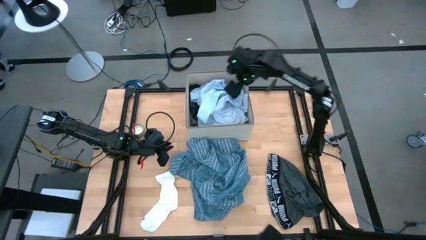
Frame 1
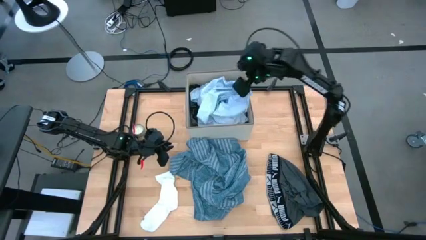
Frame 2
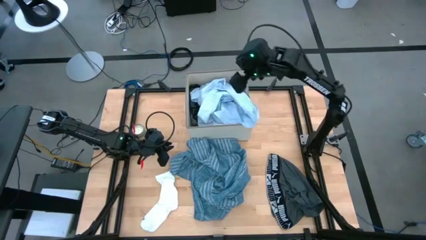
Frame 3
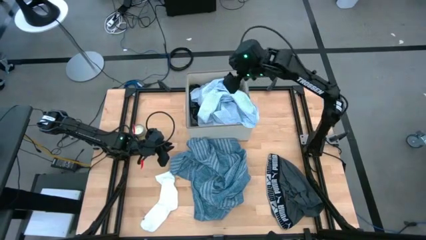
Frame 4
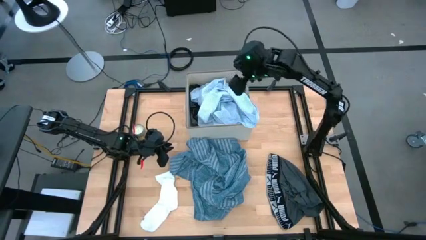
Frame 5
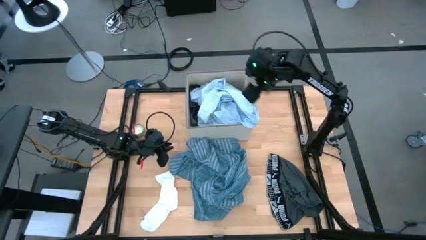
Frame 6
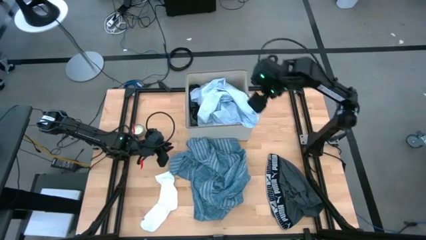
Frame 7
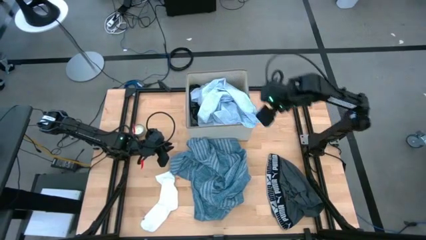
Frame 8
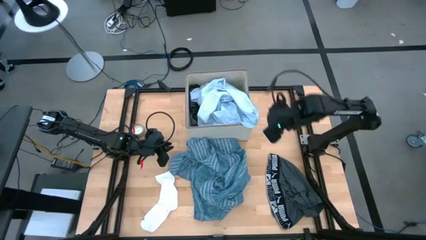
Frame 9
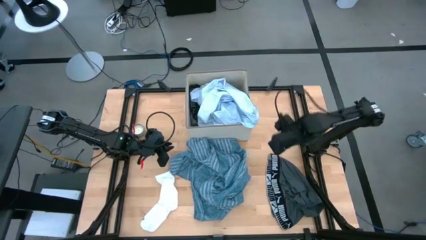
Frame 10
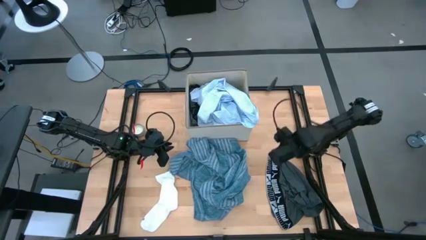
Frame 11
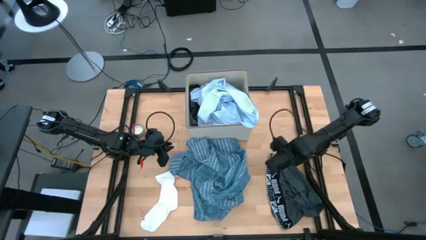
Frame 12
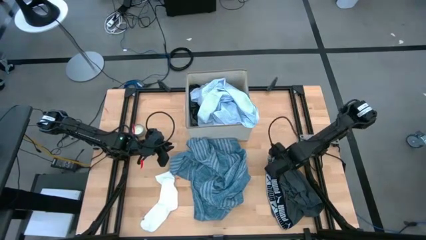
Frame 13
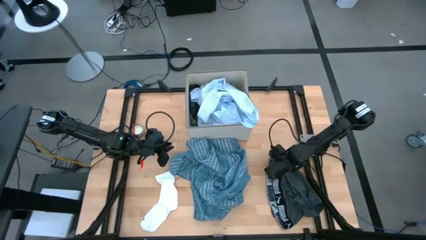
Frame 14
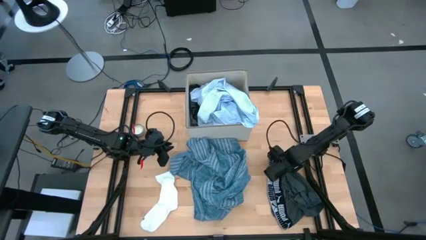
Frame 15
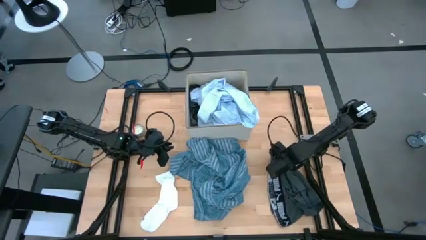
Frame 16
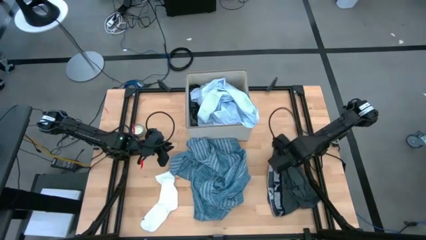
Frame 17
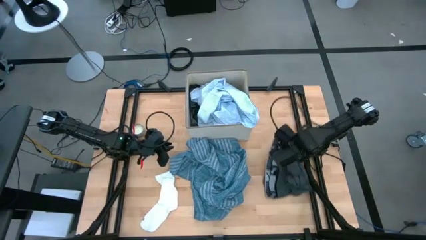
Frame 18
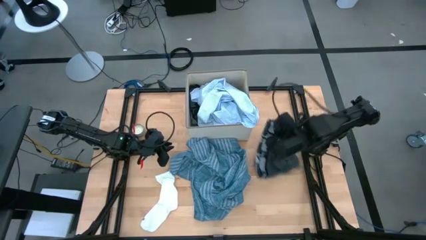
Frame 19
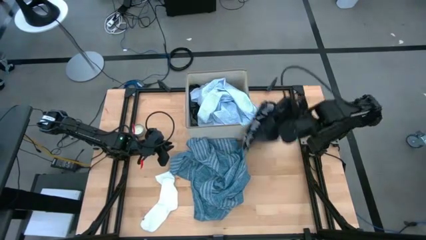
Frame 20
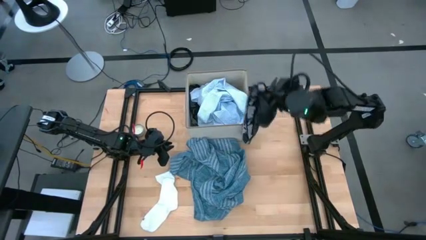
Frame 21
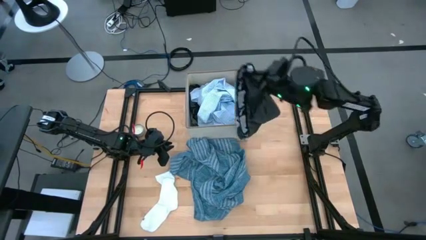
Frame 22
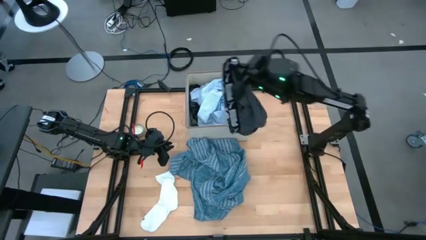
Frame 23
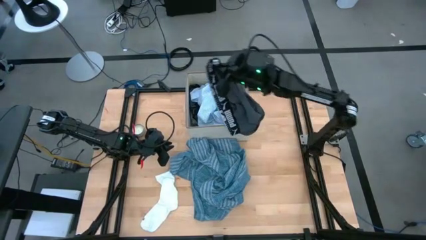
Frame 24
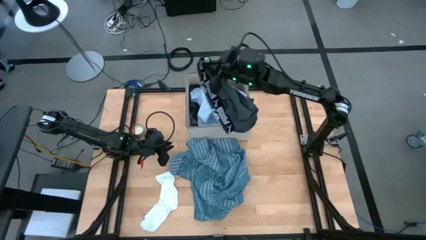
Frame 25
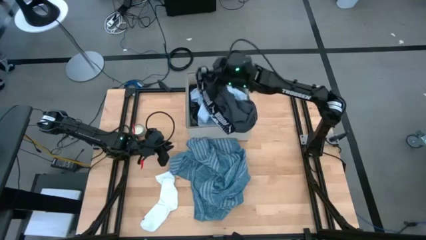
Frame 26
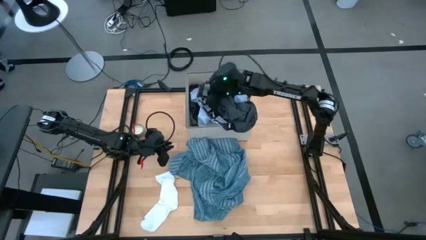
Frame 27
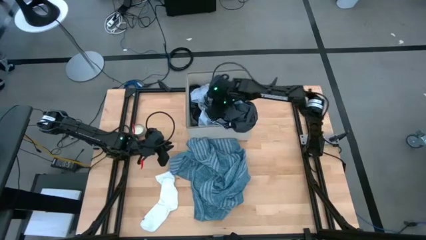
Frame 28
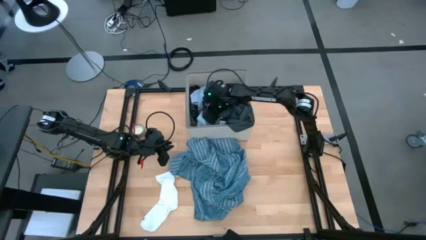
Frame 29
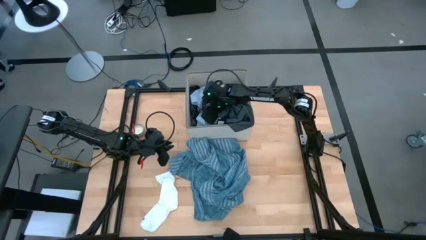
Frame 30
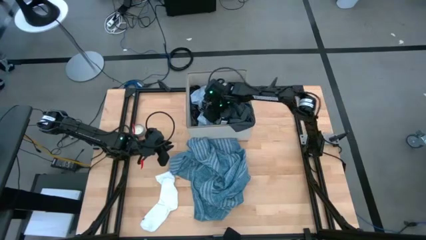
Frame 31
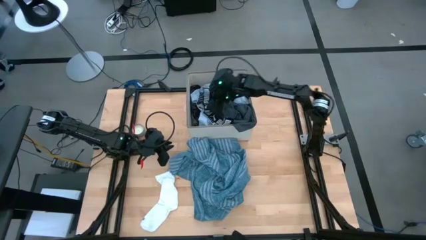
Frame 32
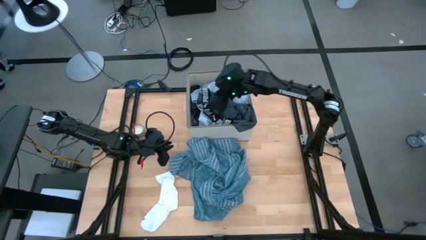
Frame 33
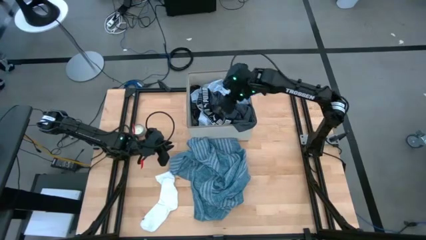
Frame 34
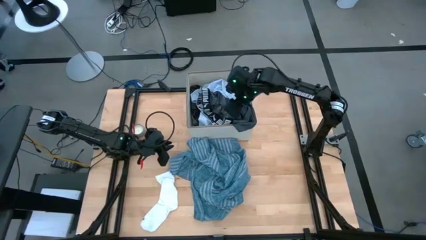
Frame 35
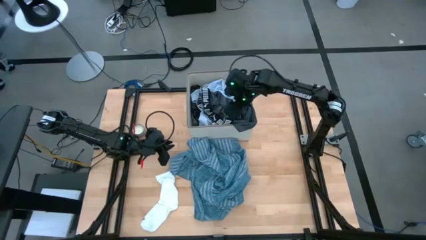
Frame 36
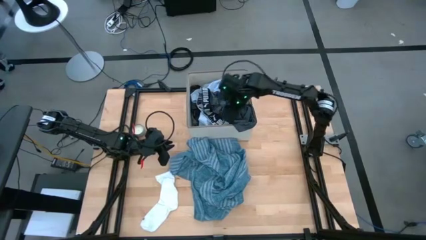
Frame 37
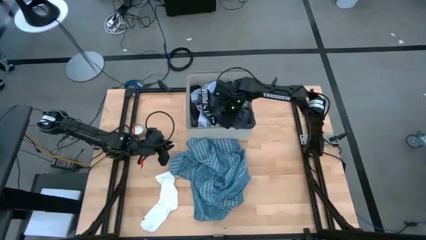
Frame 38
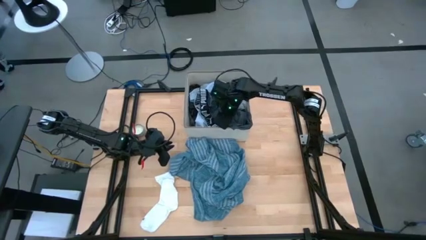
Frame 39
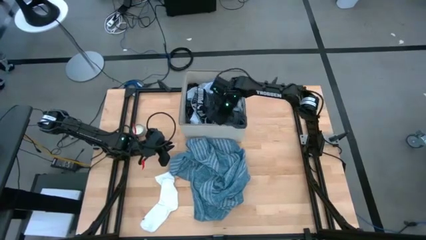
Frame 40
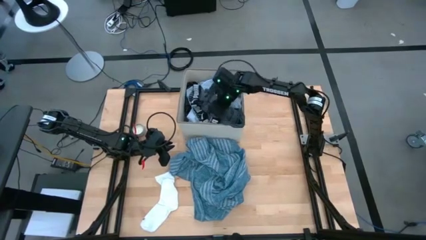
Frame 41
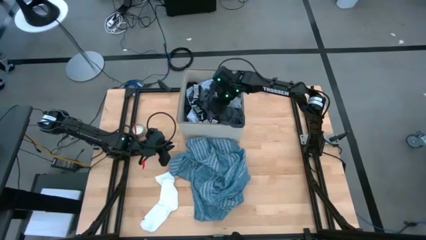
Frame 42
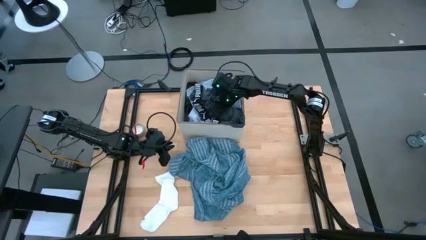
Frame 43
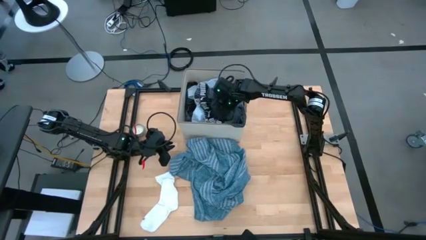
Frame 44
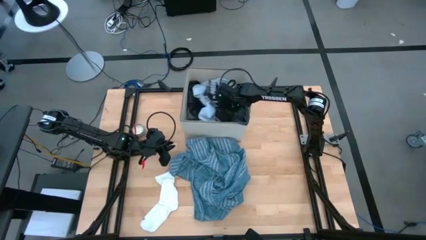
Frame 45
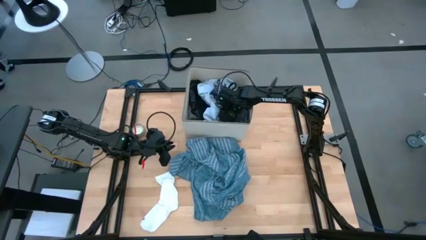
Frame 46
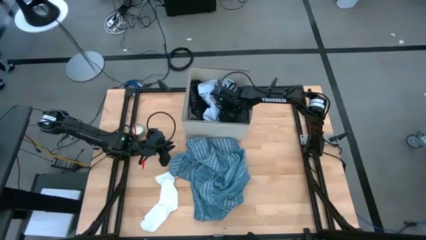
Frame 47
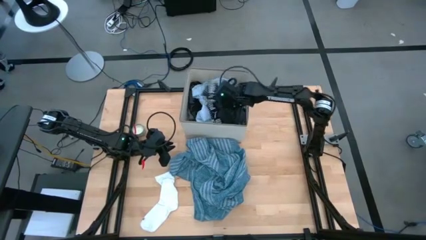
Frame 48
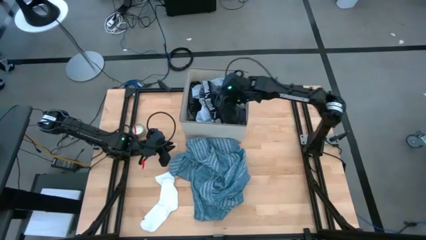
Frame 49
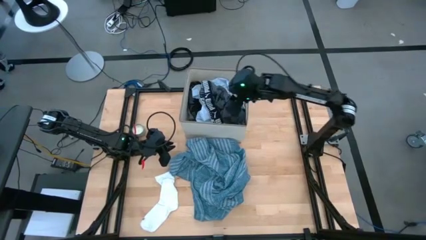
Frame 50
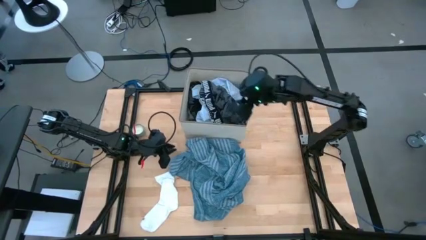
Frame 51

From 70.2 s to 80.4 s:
Task: Sort clothes
Put the gray boxer into the laundry bin

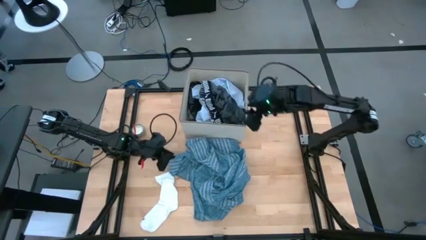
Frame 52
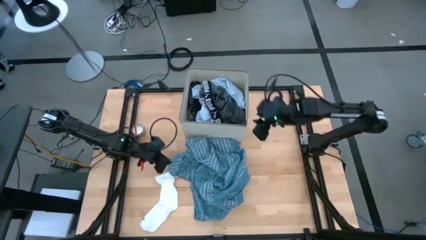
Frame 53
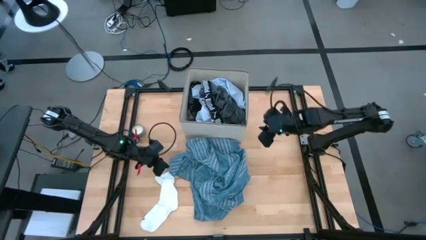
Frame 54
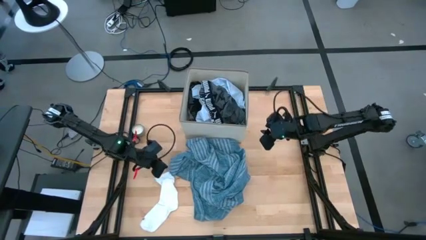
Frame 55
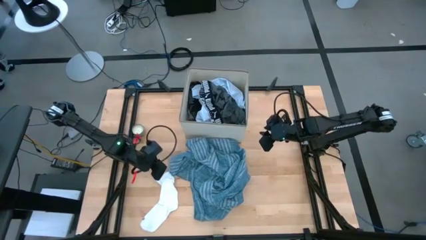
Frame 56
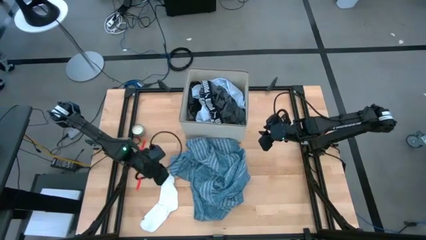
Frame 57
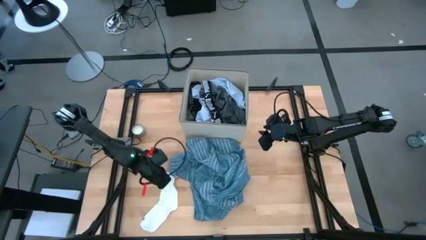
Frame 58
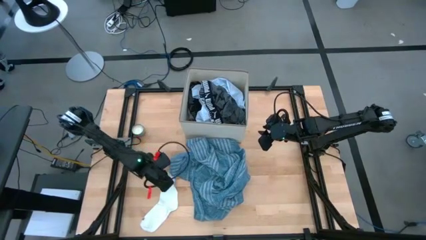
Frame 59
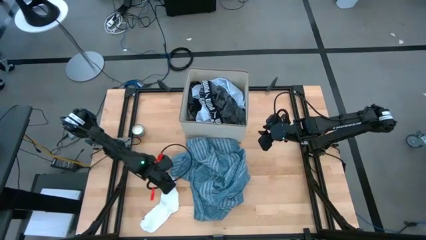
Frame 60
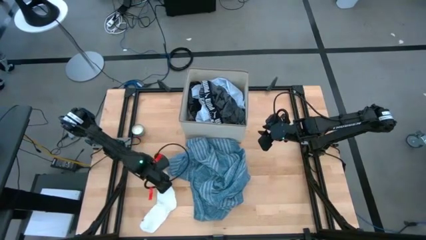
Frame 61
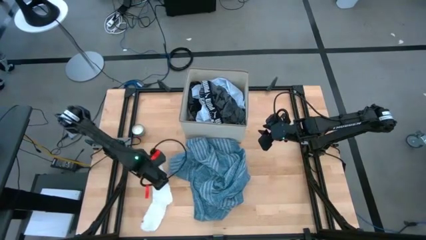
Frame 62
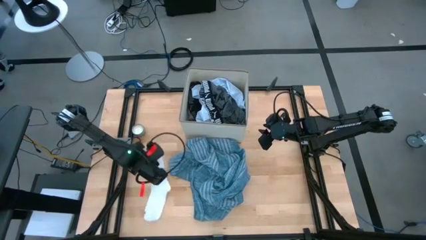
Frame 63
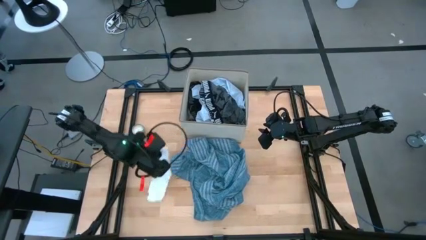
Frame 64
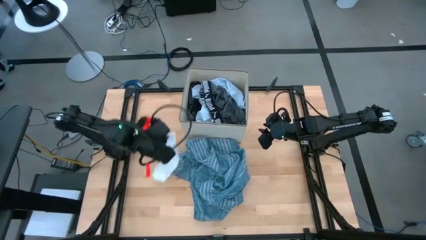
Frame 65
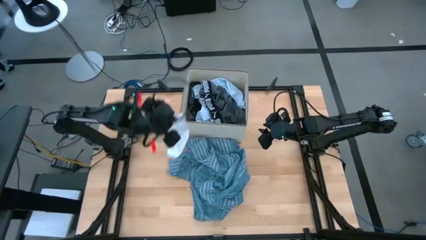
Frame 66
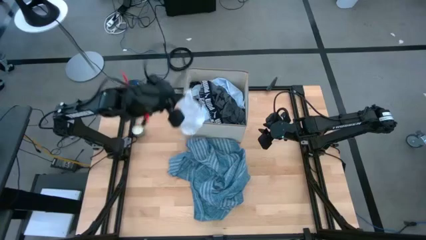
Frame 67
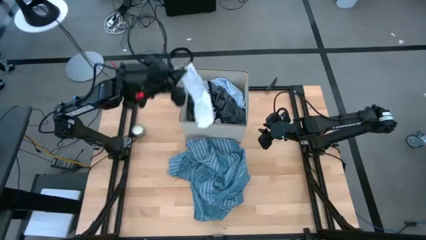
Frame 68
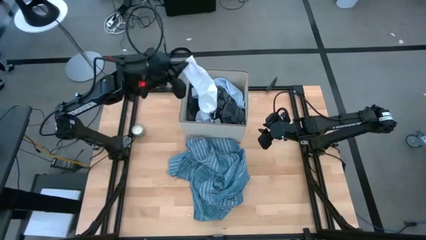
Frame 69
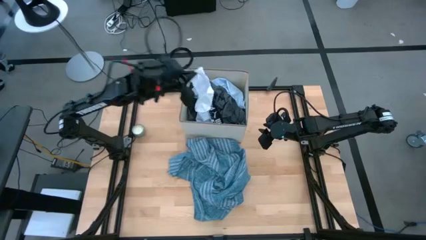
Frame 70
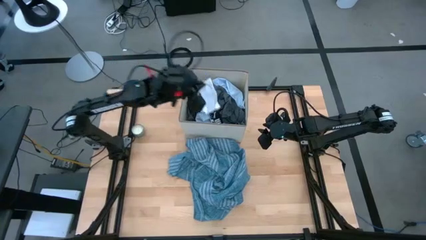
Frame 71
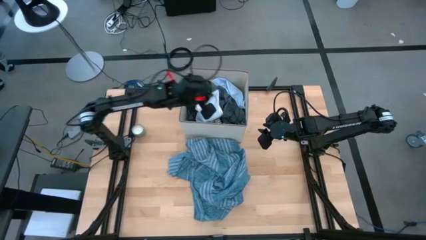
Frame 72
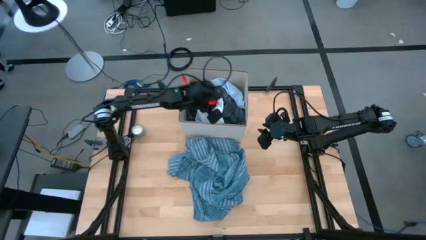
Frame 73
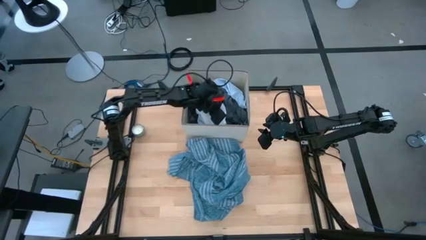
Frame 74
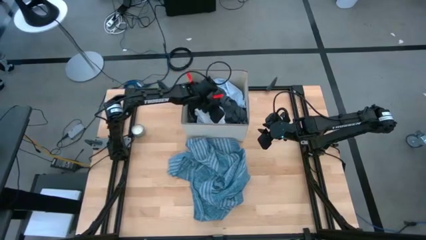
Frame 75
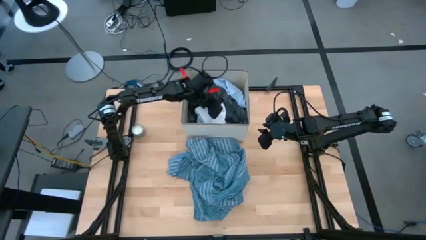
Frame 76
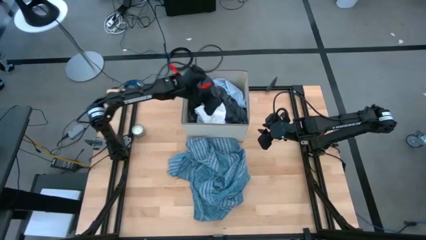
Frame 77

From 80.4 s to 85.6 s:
Put the white sock into the laundry bin

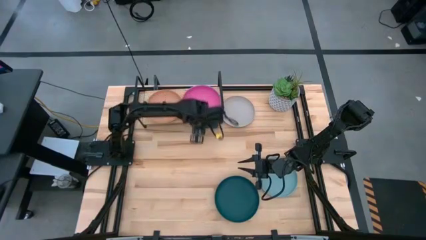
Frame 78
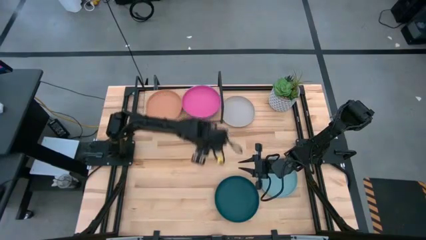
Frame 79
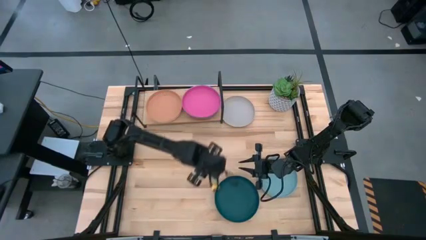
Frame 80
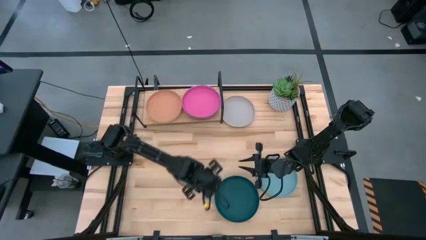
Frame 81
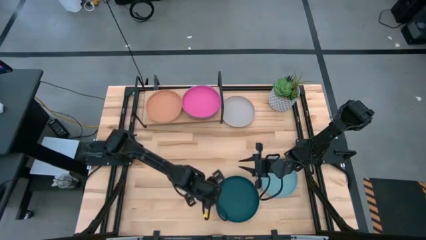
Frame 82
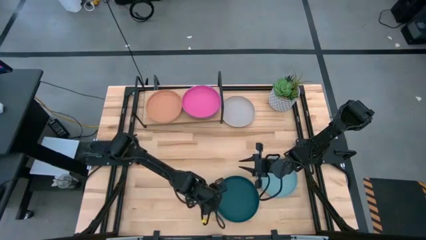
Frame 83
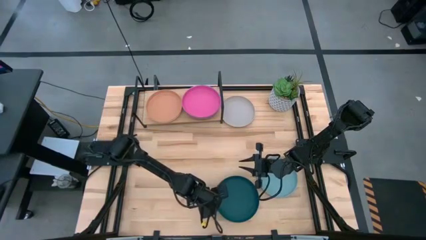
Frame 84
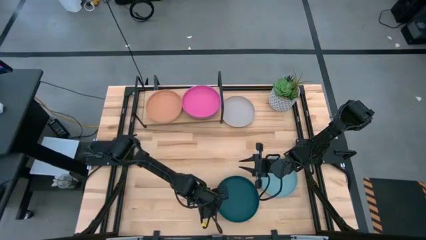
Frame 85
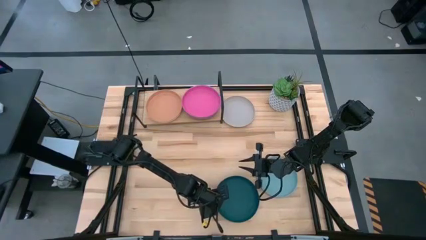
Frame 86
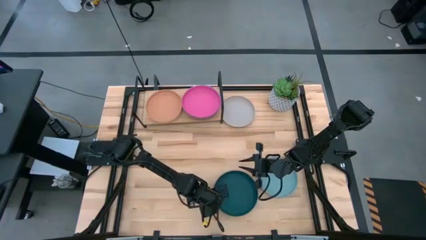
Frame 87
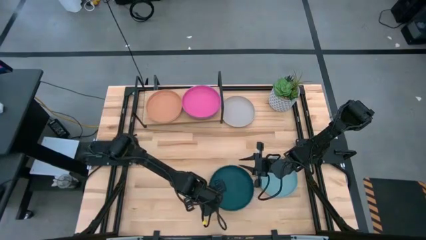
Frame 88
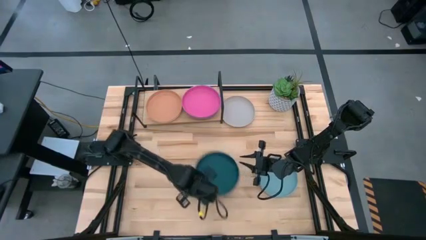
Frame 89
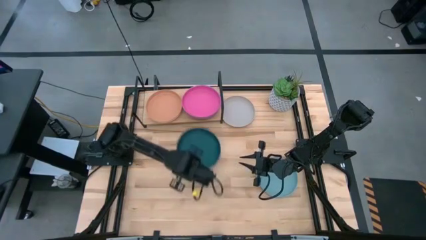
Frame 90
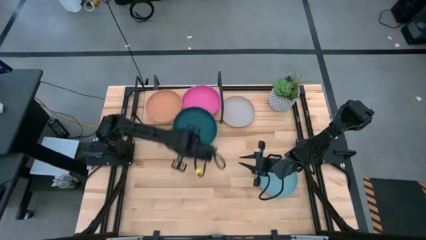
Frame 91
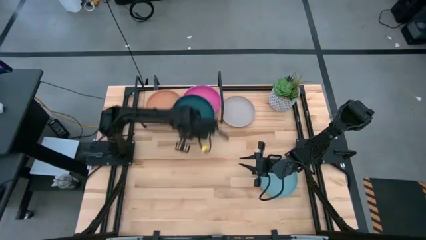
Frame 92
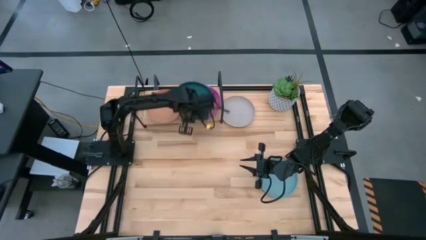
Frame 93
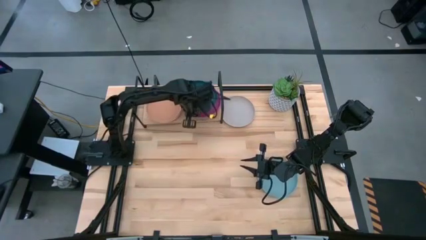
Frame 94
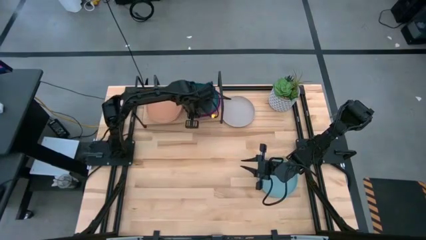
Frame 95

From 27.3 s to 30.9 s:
Task: Place and stack plates onto a shelf
Stack the green plate on top of the purple plate
